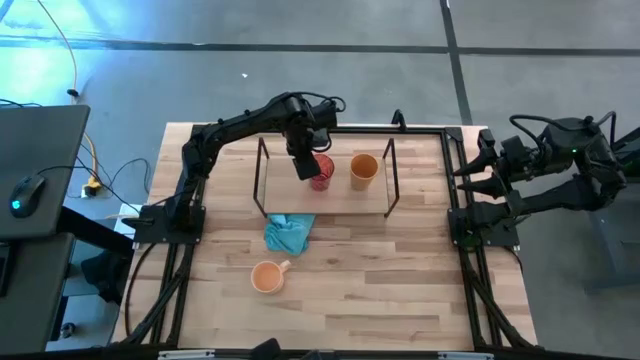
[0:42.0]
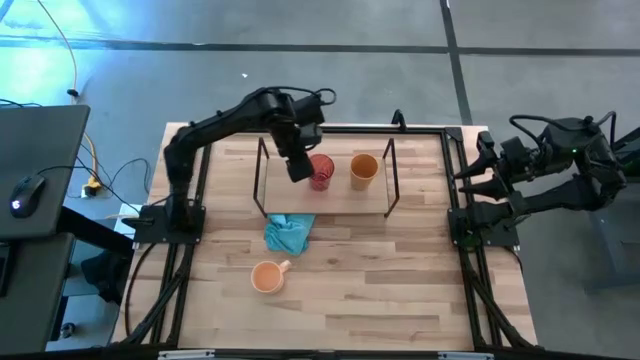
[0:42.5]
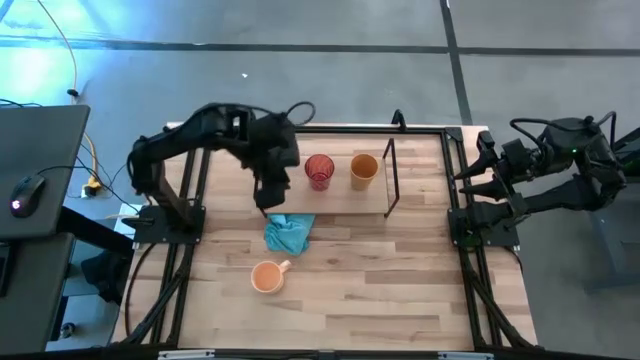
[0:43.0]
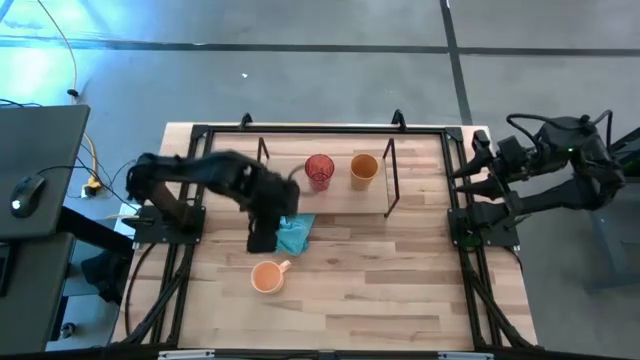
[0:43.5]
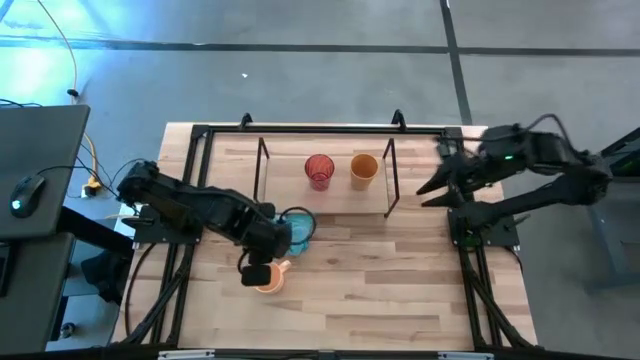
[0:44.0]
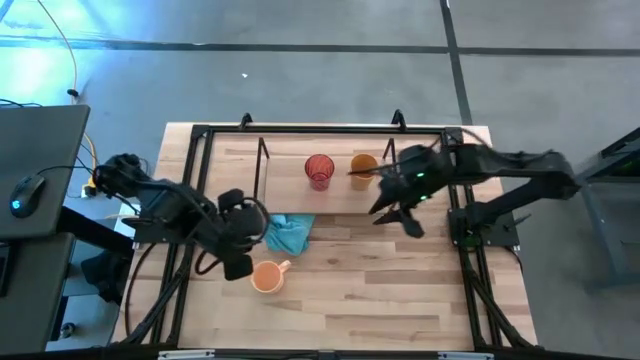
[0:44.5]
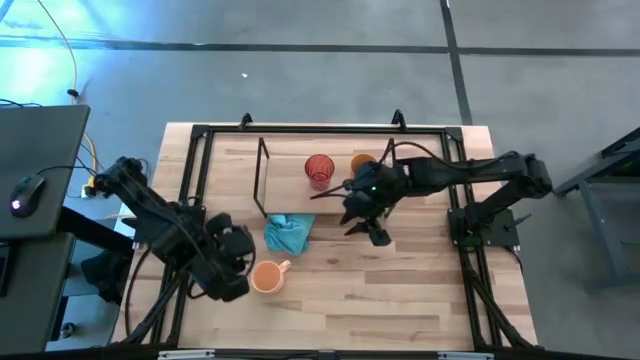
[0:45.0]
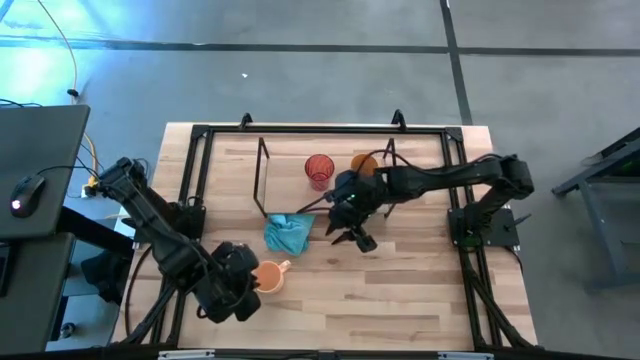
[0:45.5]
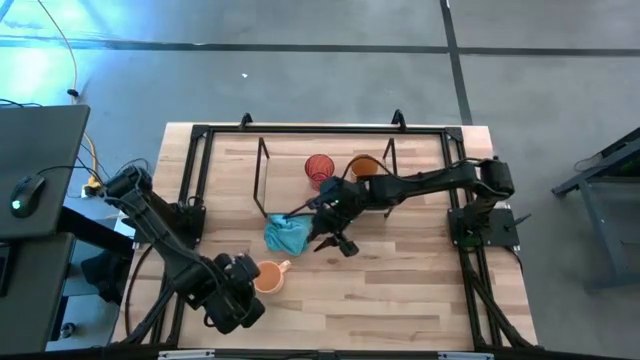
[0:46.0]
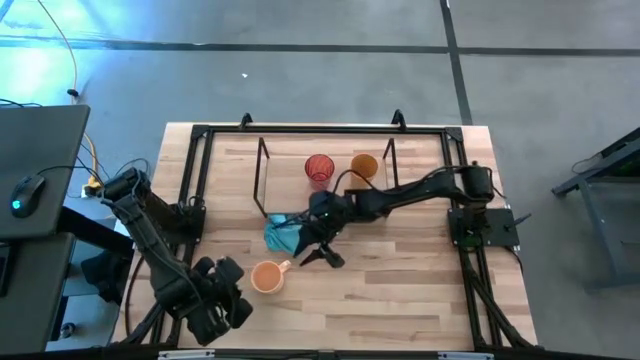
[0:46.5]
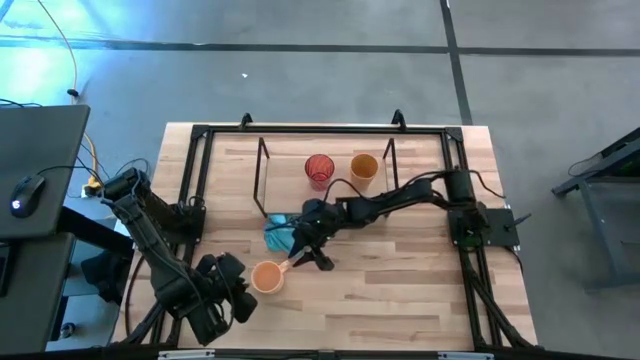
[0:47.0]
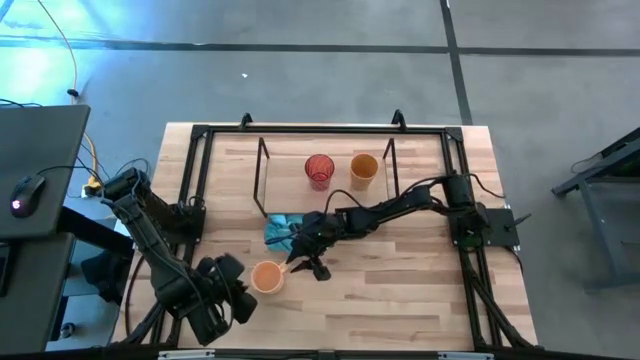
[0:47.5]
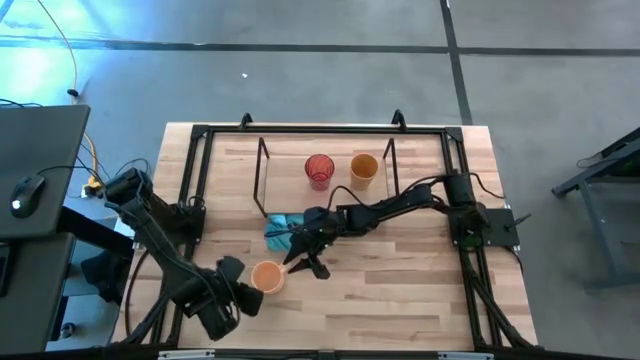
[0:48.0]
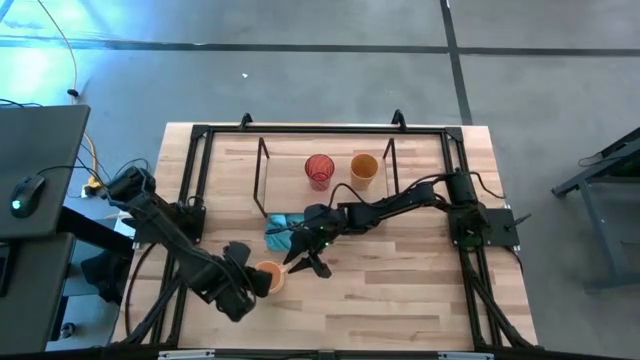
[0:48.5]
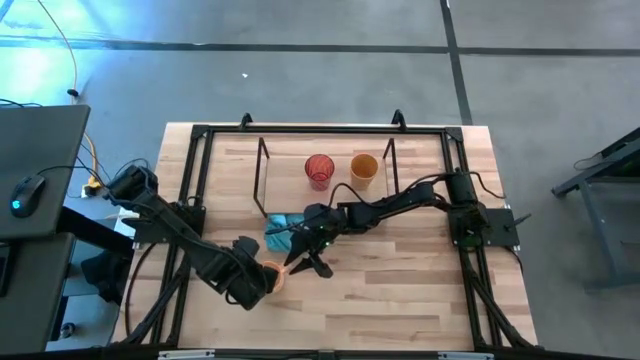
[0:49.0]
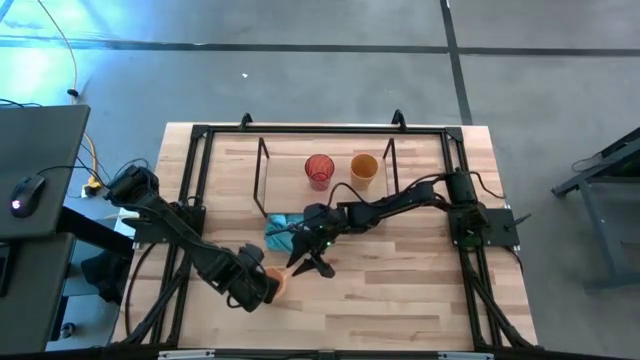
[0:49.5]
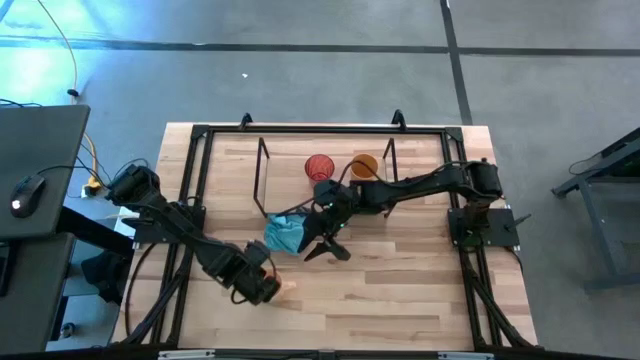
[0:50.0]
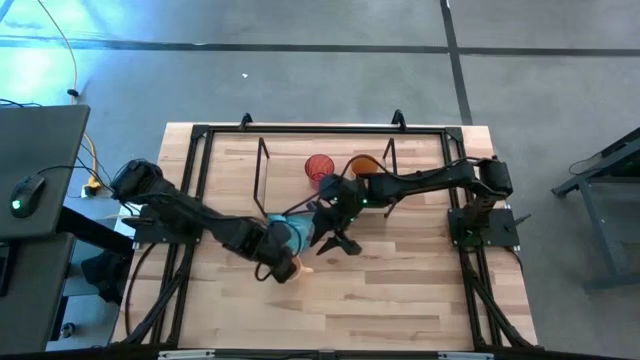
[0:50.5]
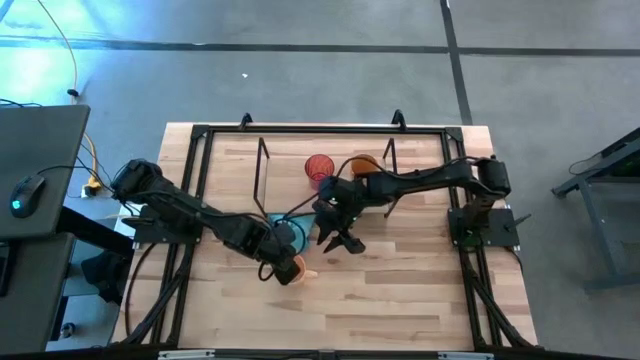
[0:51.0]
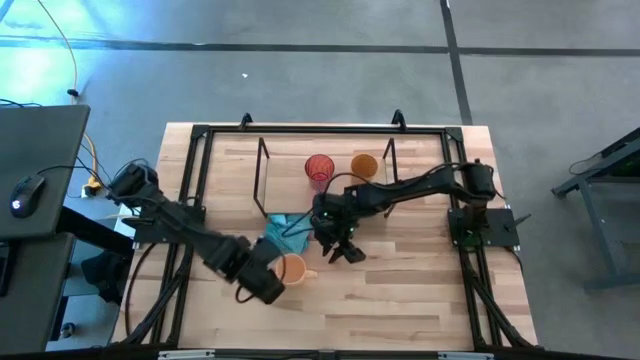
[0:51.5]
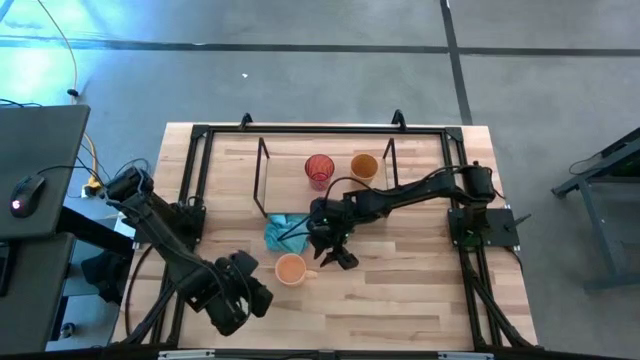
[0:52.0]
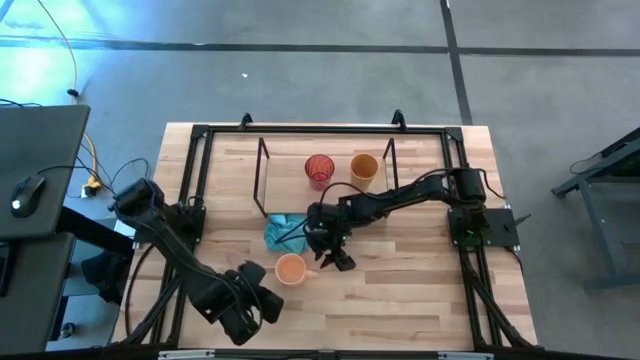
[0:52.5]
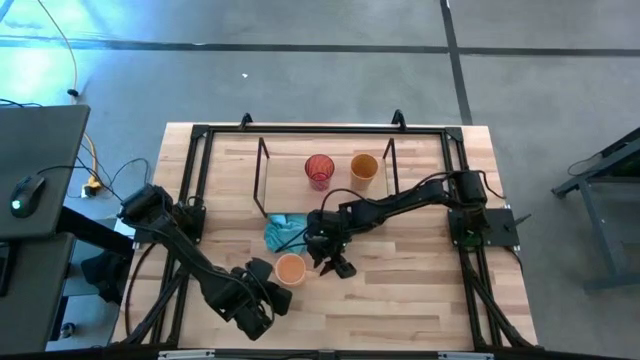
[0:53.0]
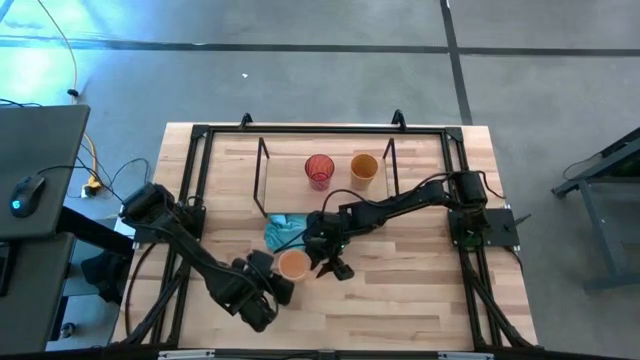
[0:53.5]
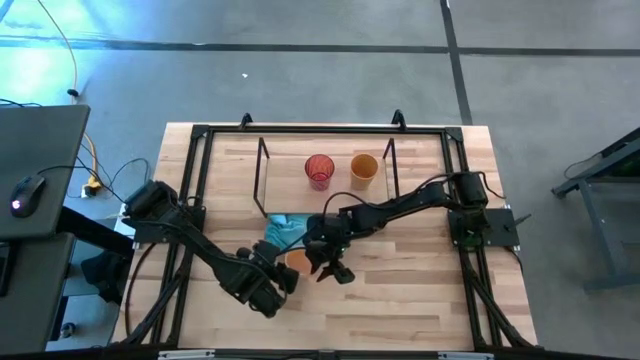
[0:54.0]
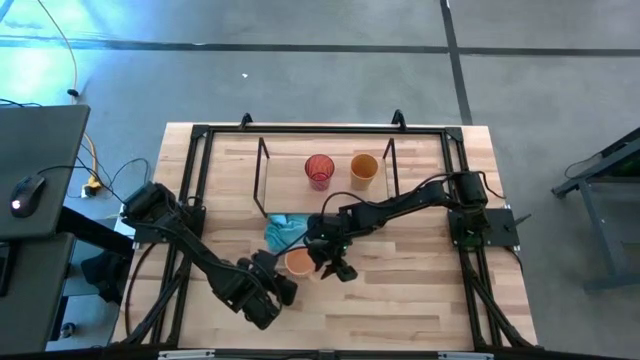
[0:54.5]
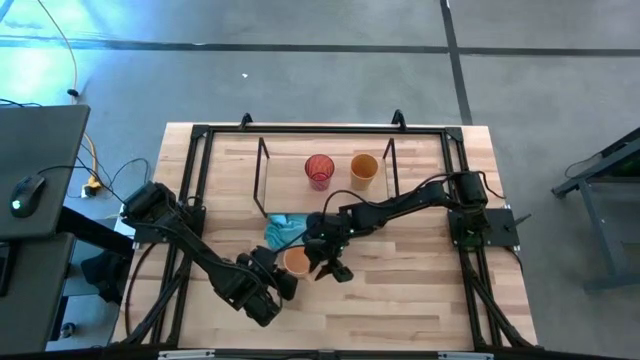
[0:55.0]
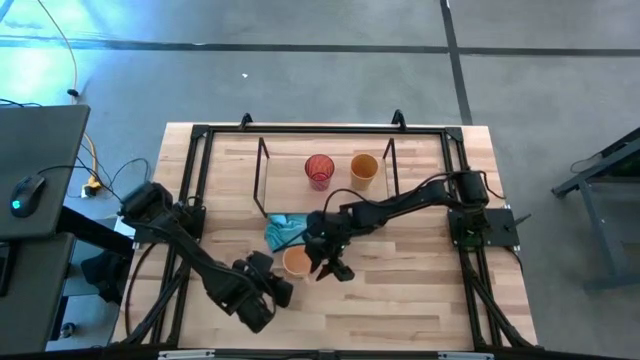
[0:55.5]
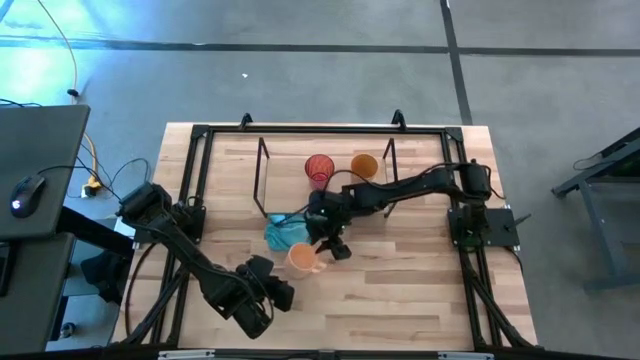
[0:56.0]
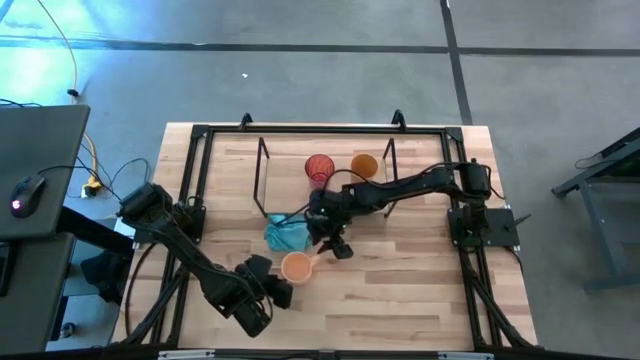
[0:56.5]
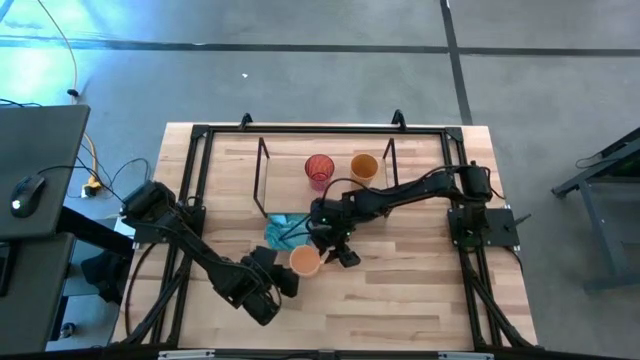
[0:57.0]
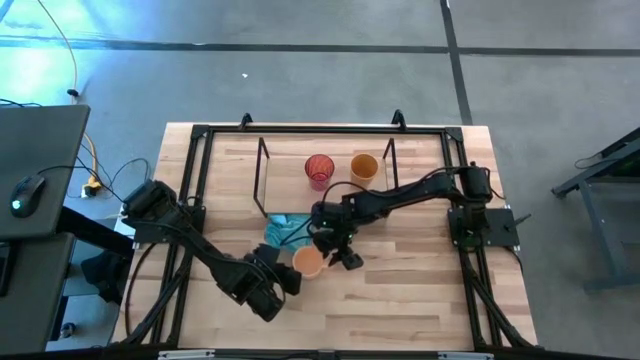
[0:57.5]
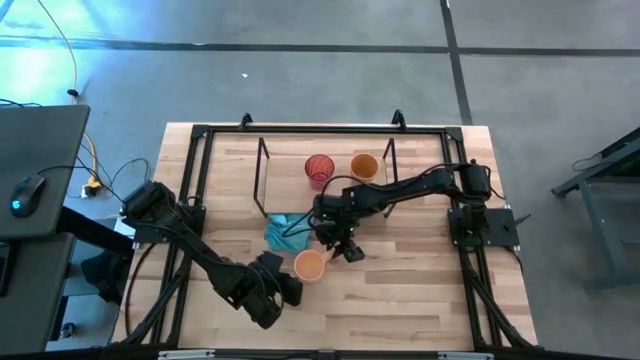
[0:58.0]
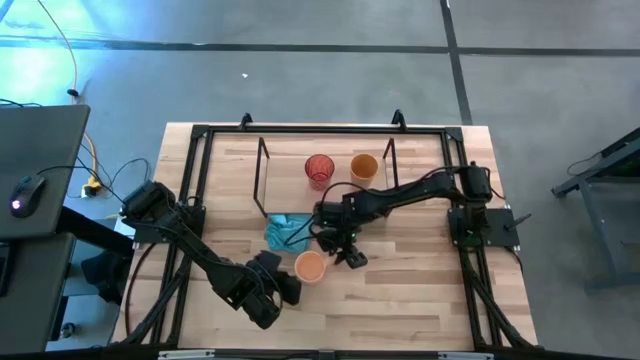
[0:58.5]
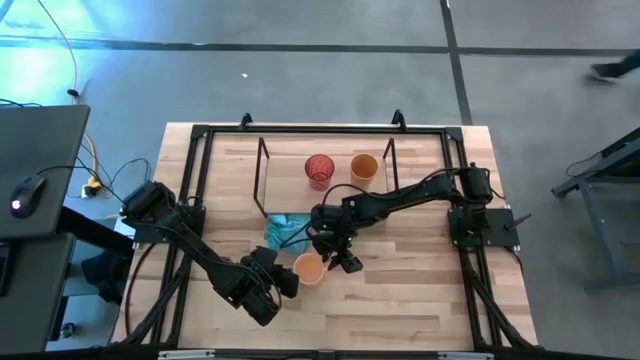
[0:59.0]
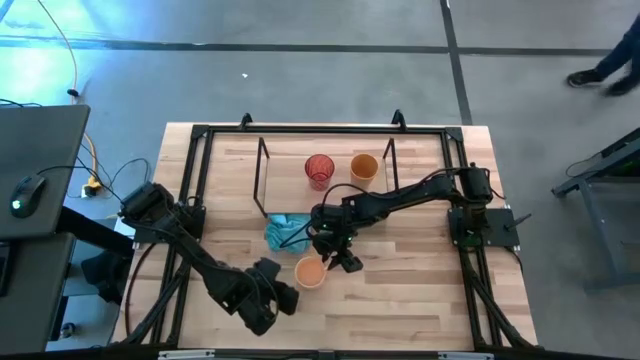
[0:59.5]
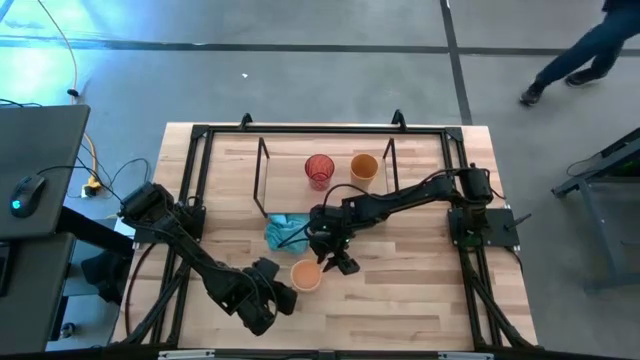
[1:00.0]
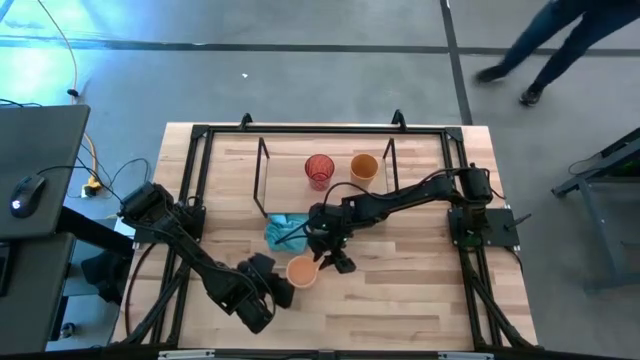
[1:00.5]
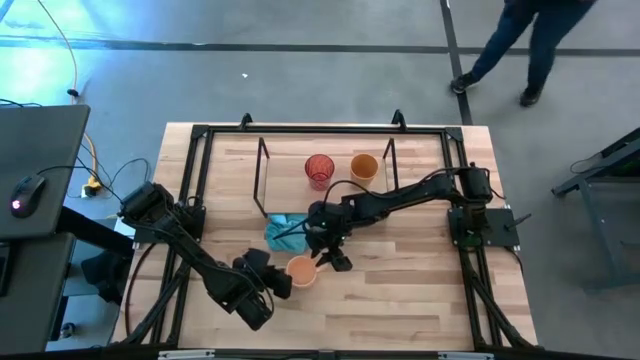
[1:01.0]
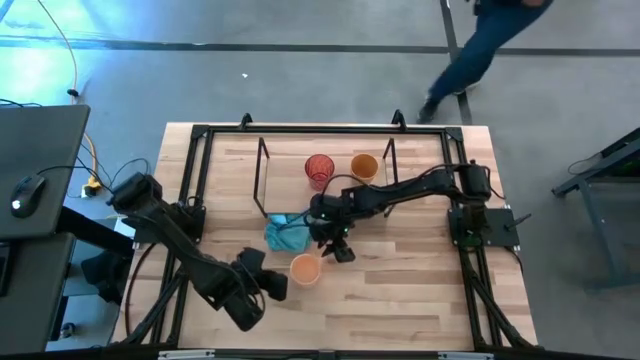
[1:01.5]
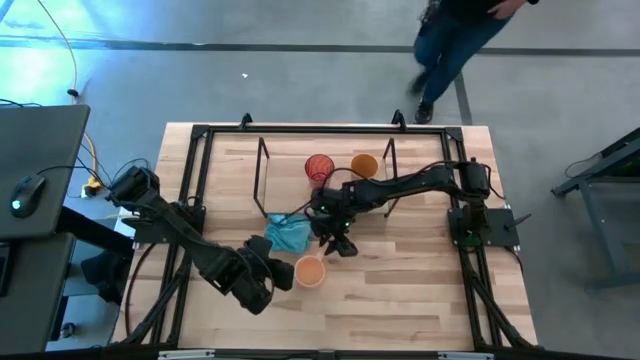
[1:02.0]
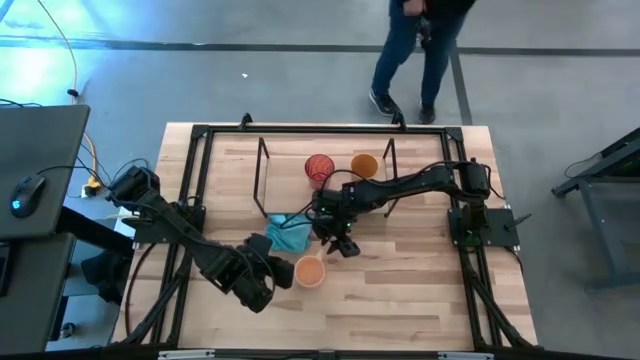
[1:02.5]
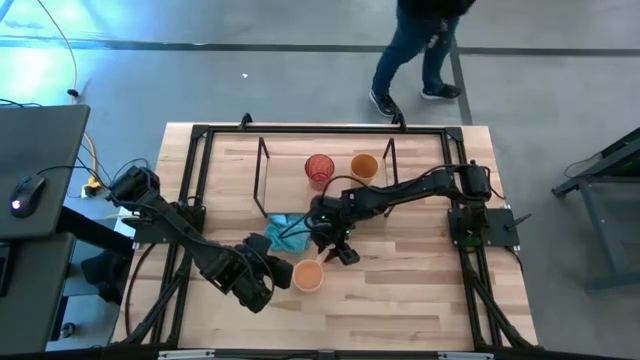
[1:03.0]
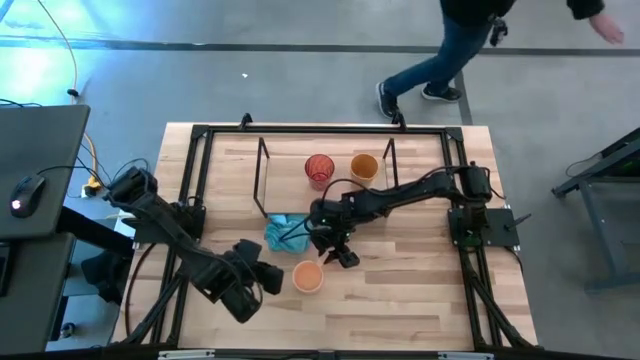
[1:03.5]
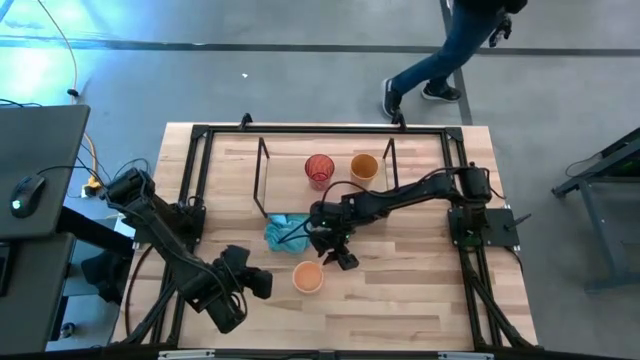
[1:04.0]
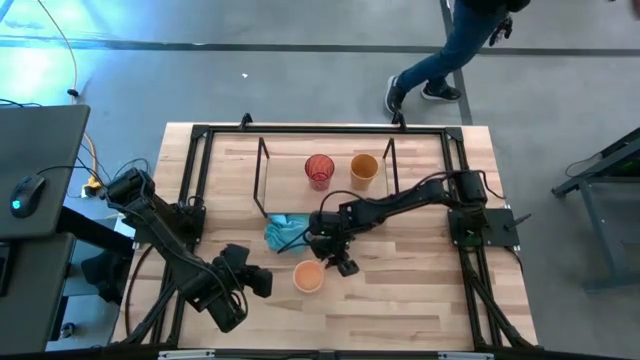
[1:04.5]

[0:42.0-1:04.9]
Task: Stack small to large cups/mugs on shelf
Put the light yellow mug on the shelf
